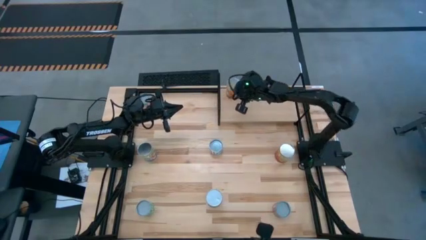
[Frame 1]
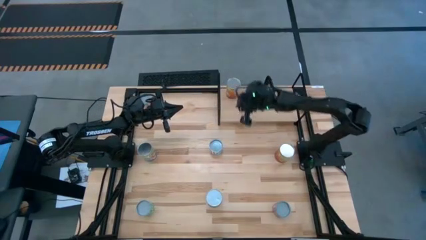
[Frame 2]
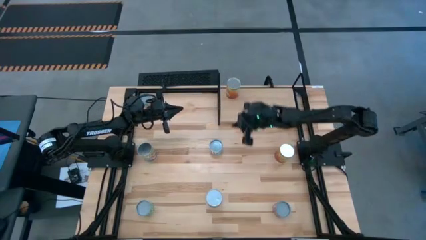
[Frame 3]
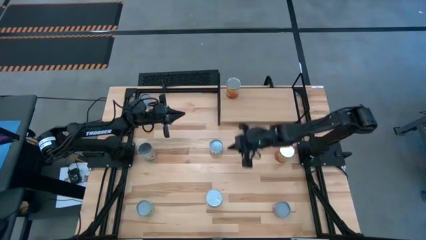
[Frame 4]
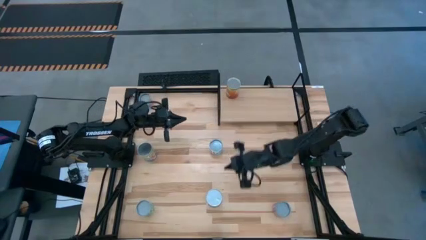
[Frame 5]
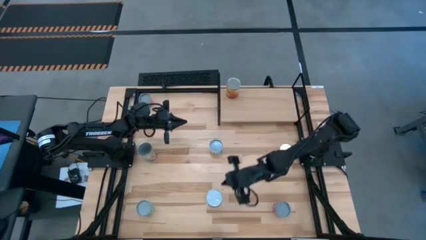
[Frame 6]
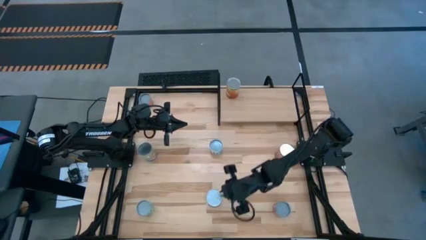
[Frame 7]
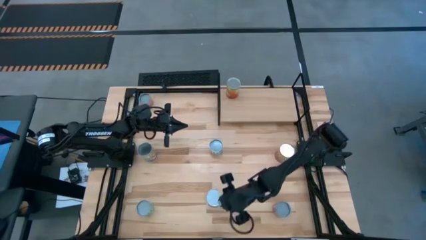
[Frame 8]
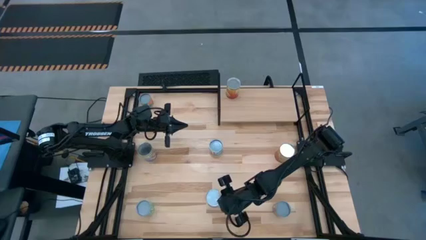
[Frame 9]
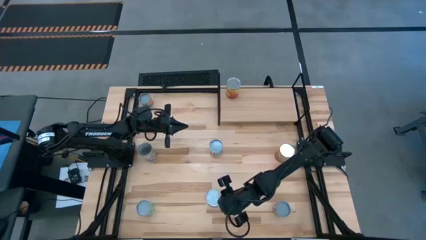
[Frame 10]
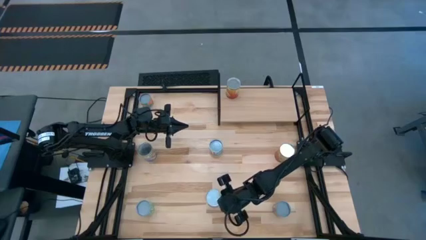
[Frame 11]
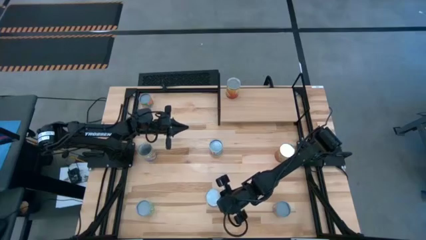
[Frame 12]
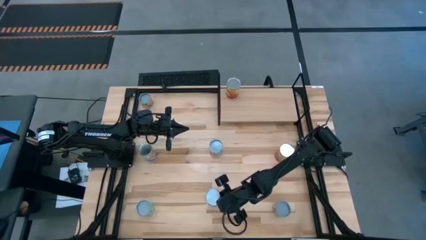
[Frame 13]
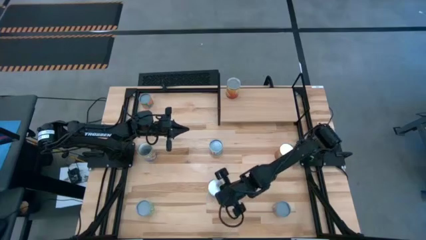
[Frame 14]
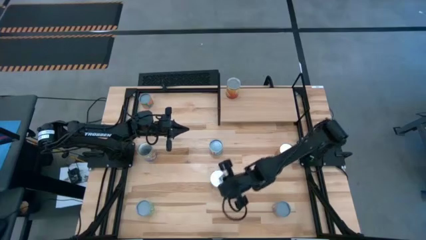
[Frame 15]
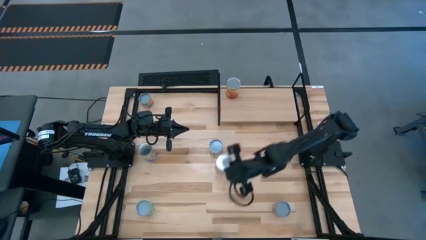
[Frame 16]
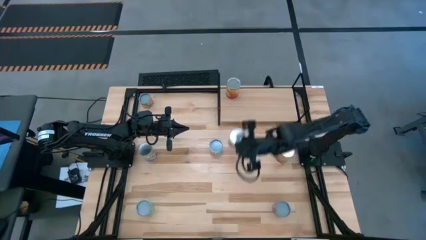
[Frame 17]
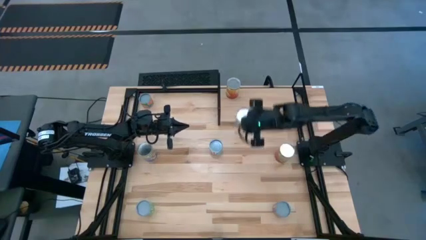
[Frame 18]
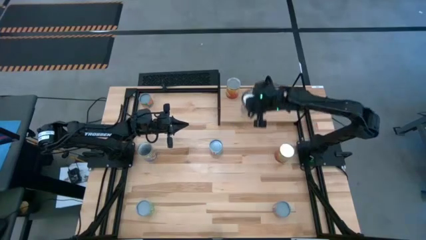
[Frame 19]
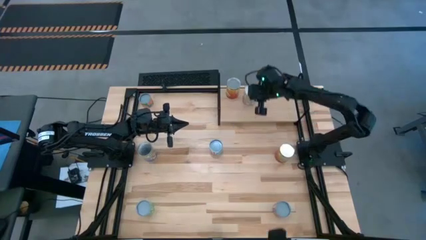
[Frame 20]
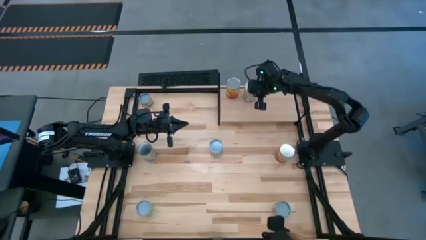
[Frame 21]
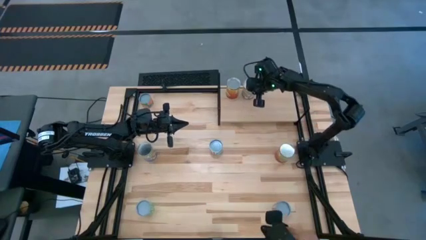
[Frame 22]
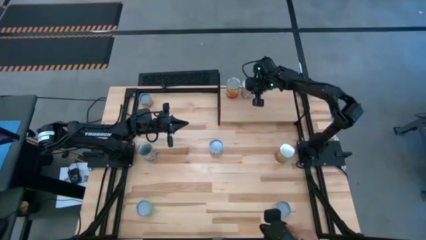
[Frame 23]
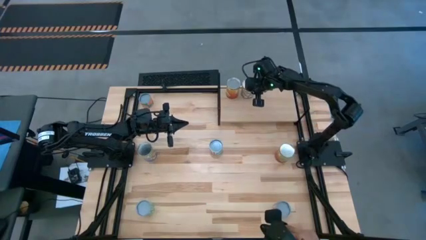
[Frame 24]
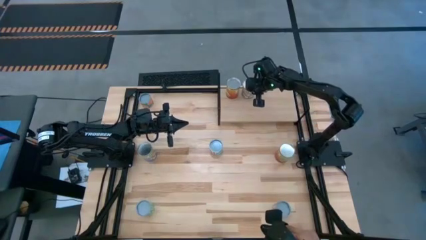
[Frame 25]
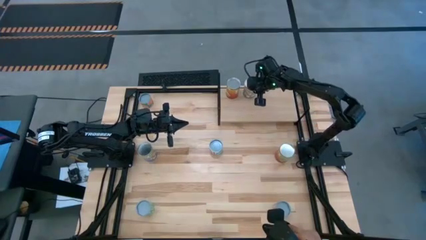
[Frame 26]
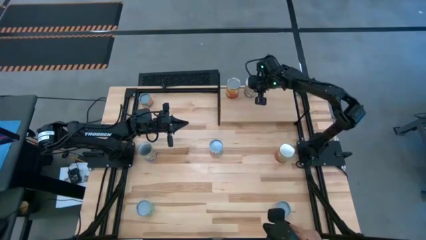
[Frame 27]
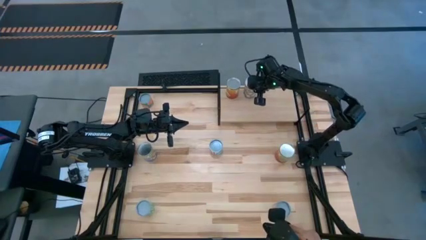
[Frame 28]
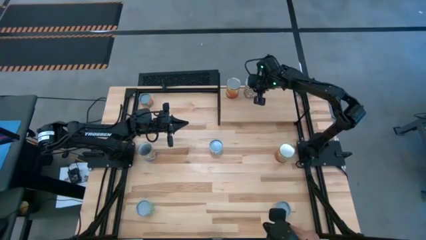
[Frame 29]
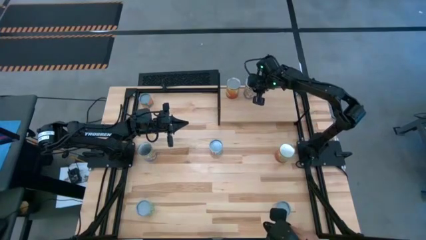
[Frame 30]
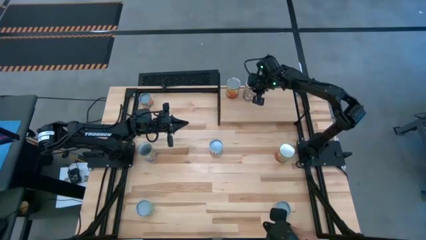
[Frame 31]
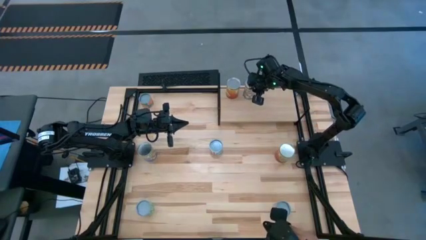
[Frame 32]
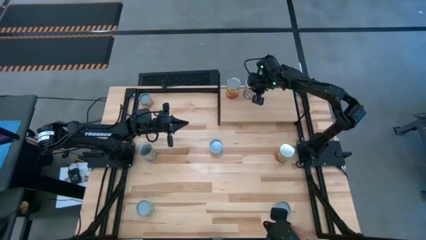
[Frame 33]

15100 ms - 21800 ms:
Task: Pick and place cans onto a shelf
Put the right blue can on the shelf

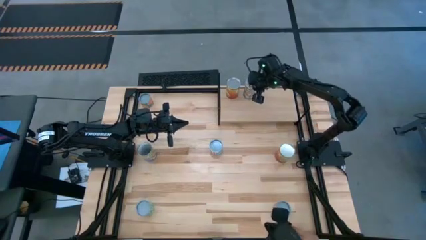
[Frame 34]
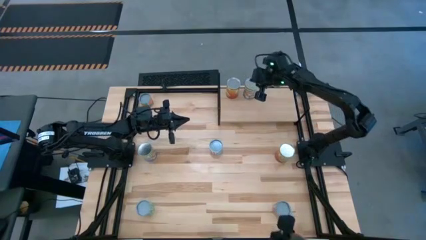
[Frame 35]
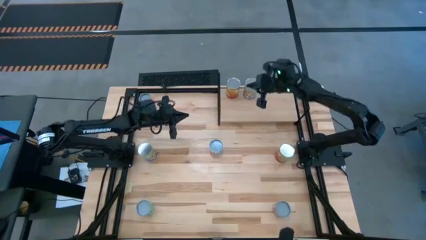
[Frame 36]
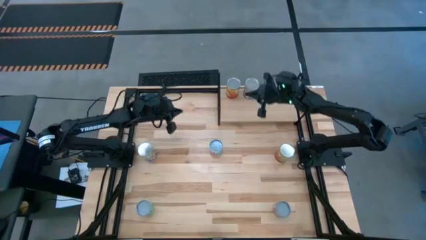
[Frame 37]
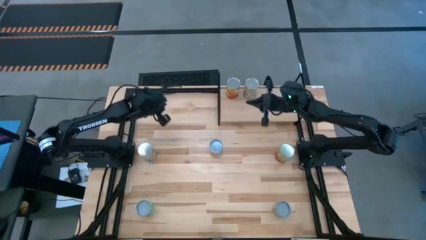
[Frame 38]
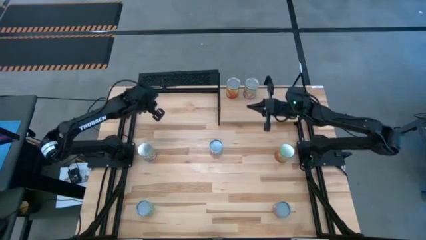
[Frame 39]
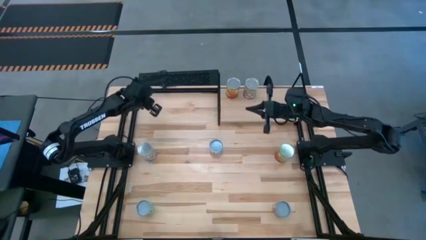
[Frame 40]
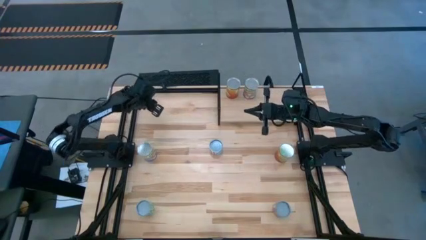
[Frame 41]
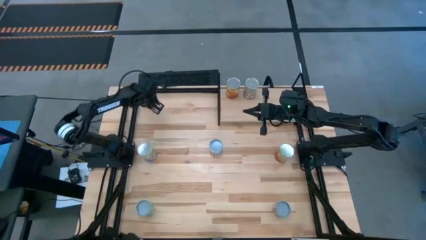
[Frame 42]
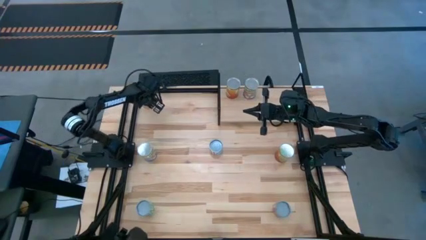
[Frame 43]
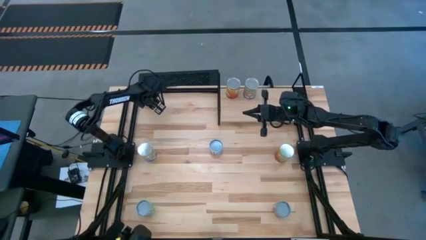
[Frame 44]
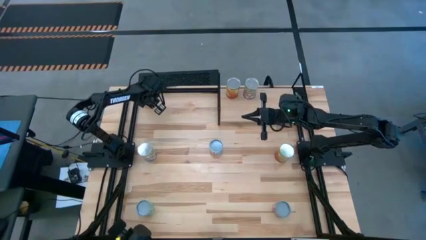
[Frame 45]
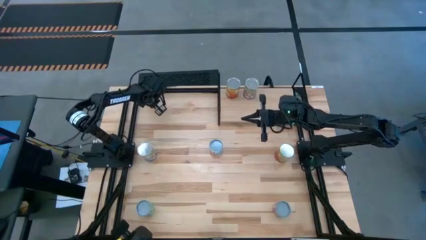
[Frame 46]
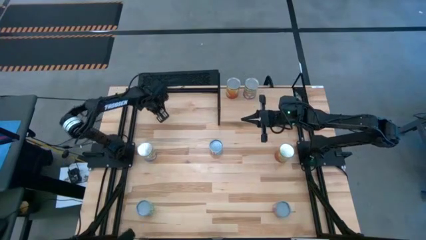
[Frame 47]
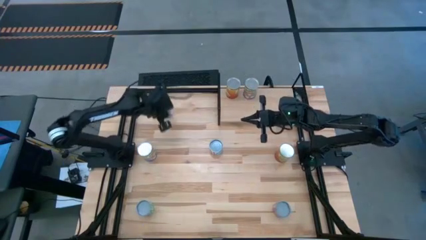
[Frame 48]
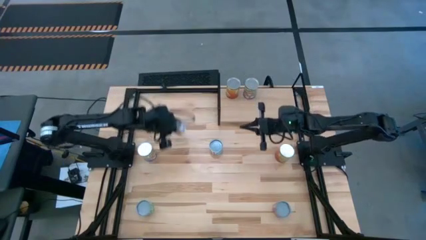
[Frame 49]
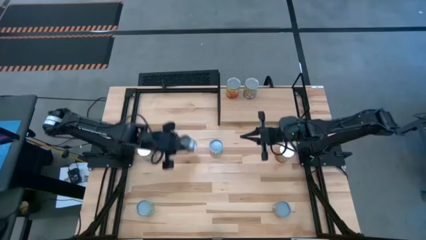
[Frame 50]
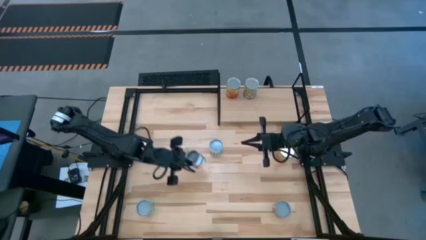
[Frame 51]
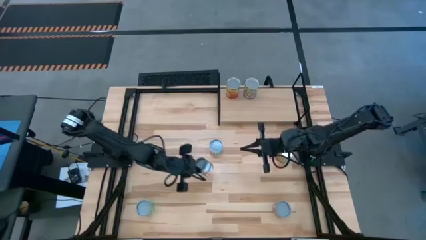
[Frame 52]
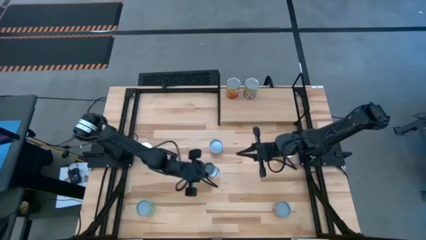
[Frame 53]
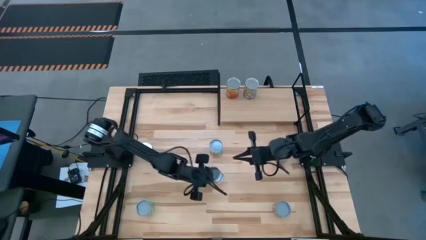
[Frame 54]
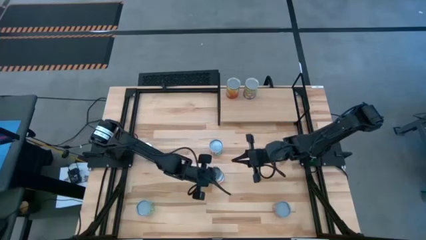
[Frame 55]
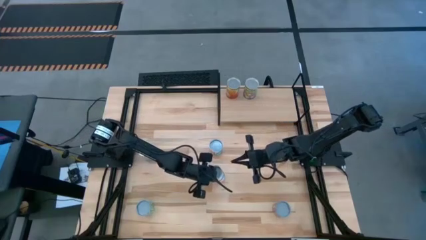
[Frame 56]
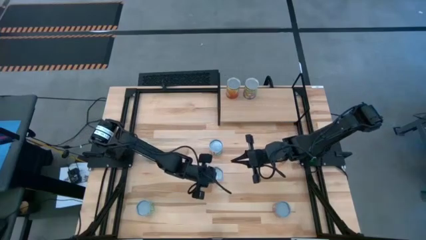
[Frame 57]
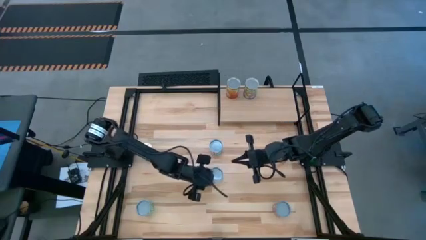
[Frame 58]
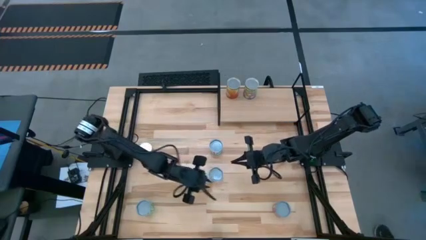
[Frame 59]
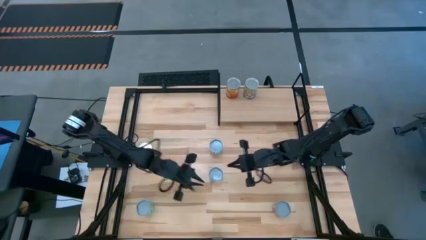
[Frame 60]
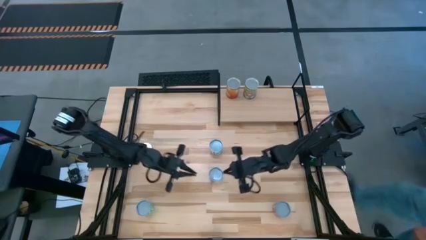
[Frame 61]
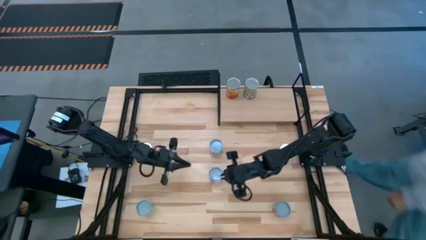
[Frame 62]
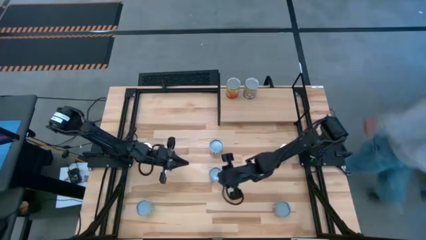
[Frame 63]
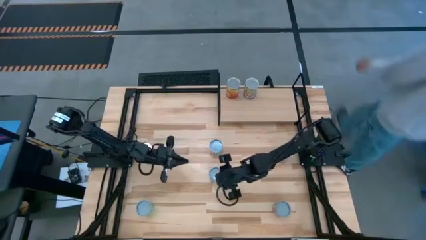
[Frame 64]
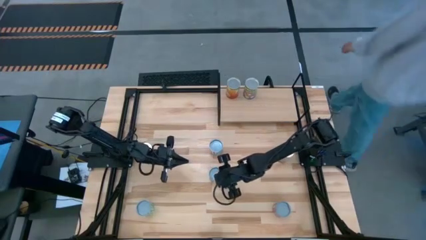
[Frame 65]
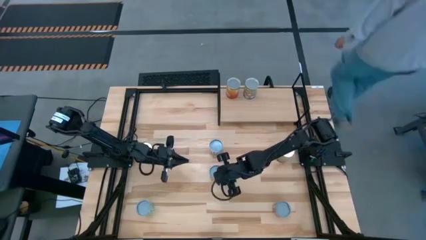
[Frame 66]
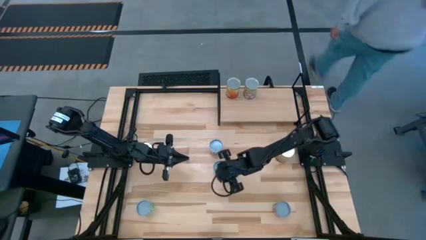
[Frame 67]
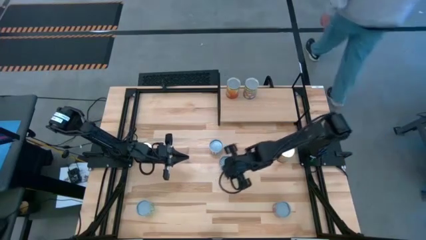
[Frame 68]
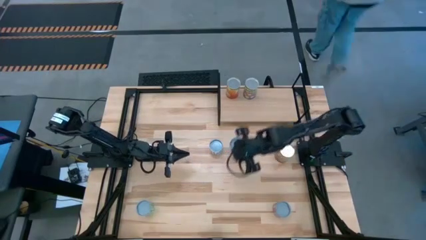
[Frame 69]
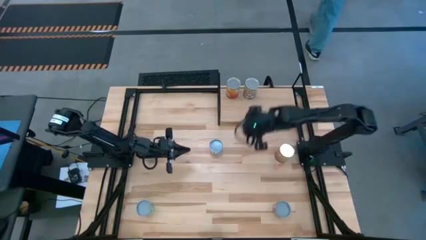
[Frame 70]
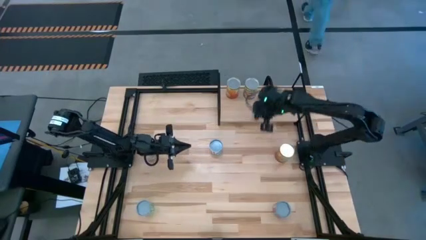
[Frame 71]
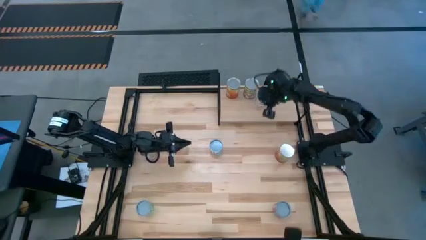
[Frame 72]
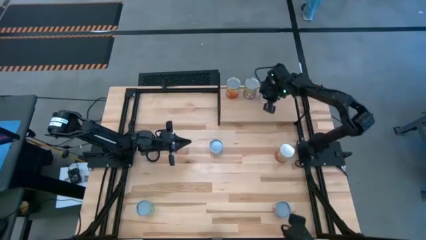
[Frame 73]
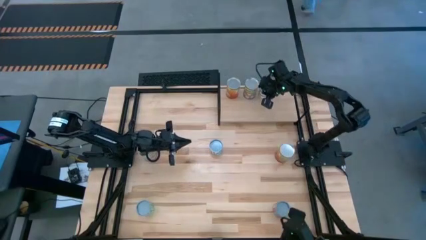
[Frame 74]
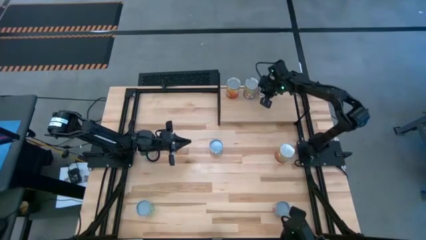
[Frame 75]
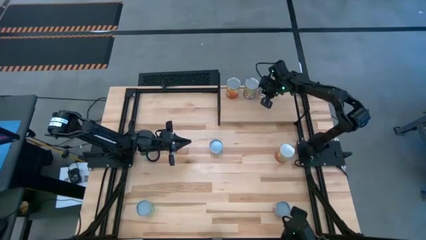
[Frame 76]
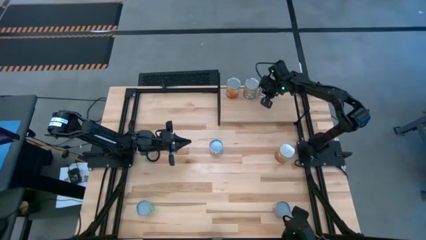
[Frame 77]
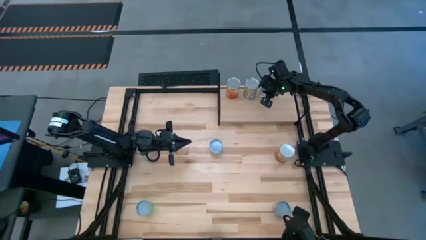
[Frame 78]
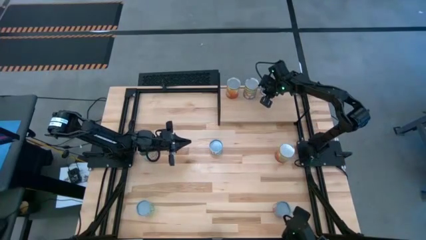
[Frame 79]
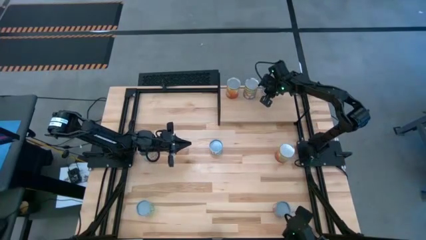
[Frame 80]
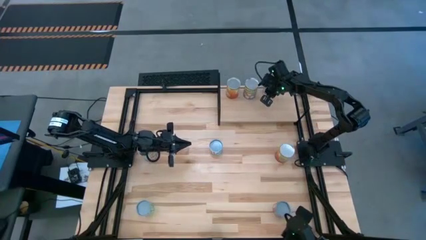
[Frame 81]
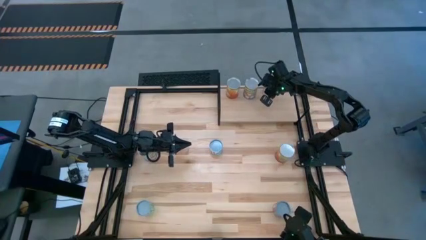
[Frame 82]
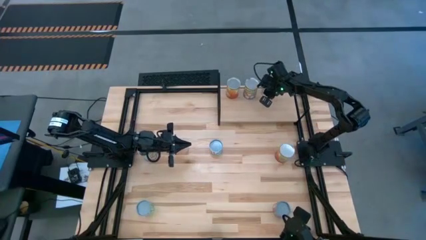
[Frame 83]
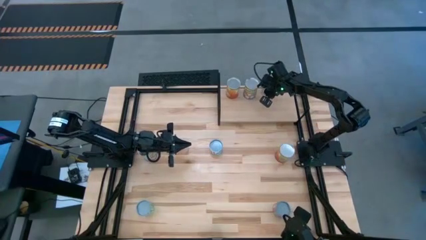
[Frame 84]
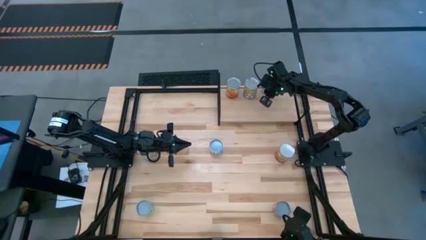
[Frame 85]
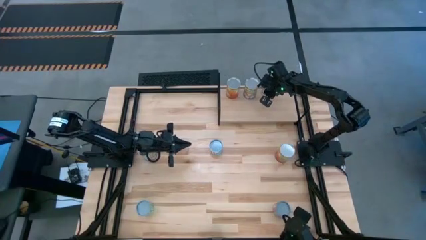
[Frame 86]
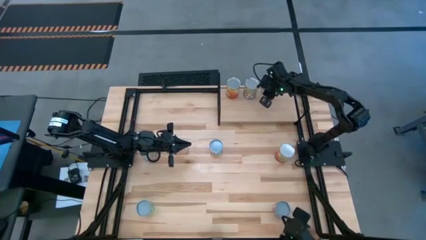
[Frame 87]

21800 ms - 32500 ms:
Put the green can on the shelf
